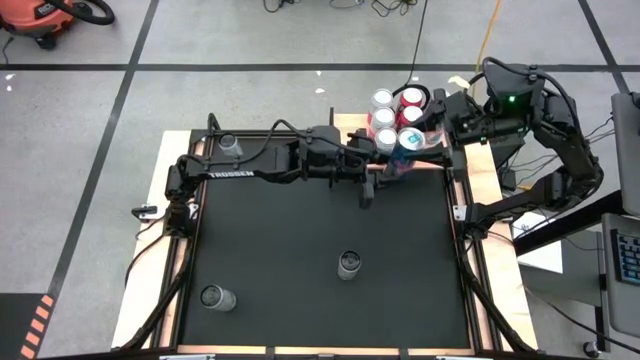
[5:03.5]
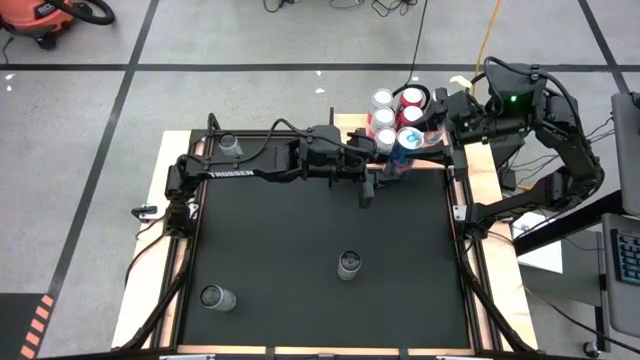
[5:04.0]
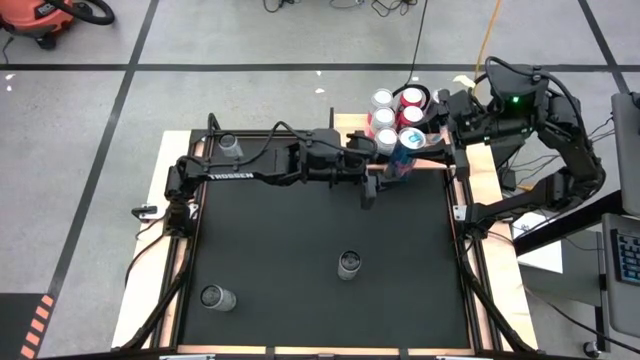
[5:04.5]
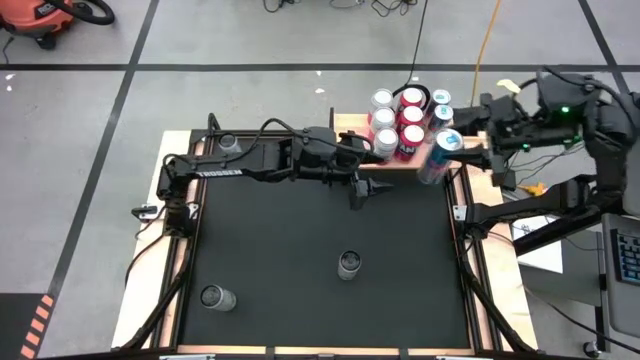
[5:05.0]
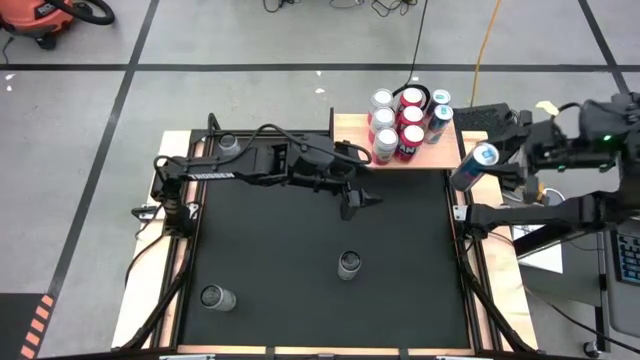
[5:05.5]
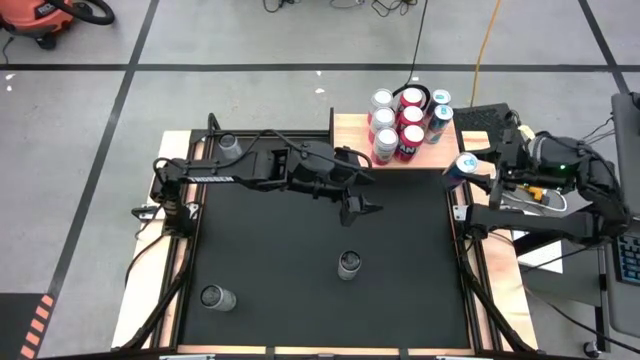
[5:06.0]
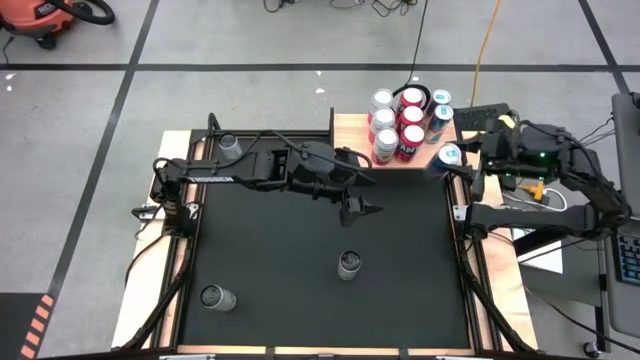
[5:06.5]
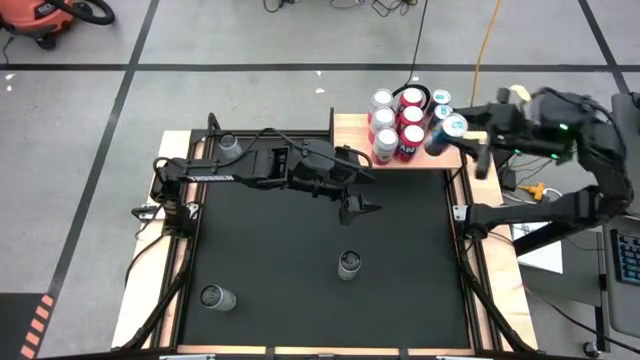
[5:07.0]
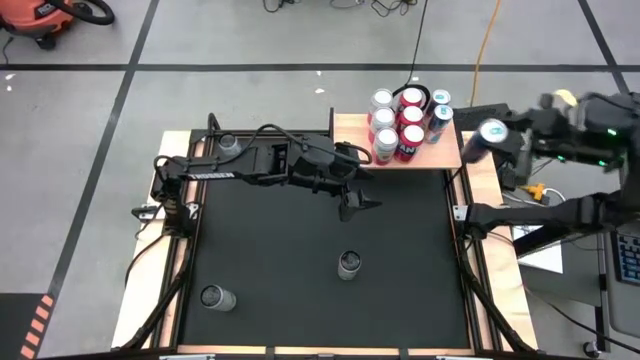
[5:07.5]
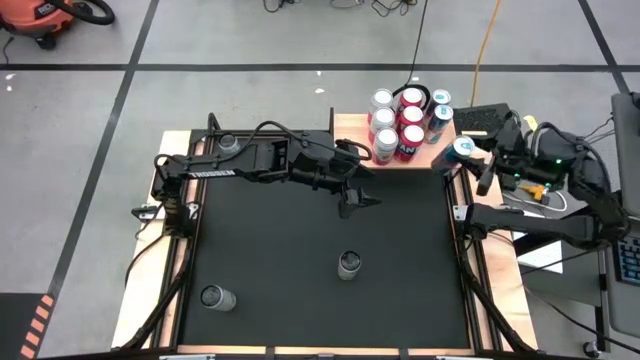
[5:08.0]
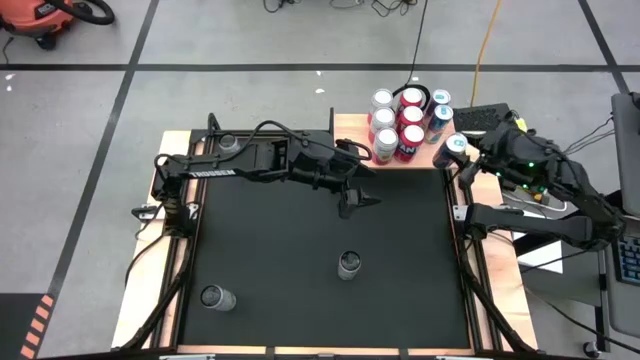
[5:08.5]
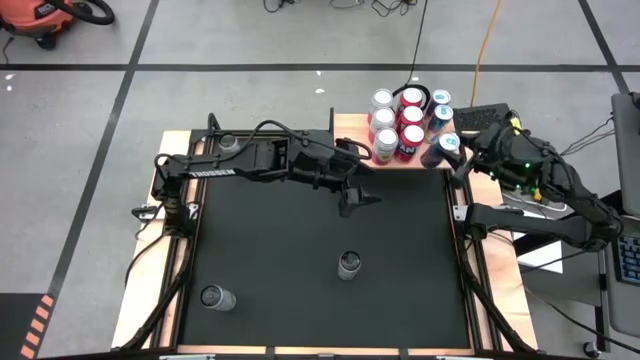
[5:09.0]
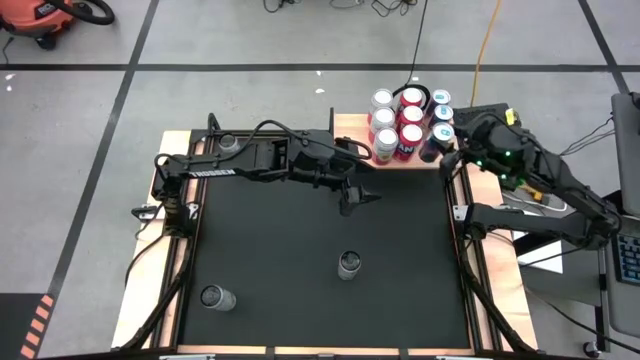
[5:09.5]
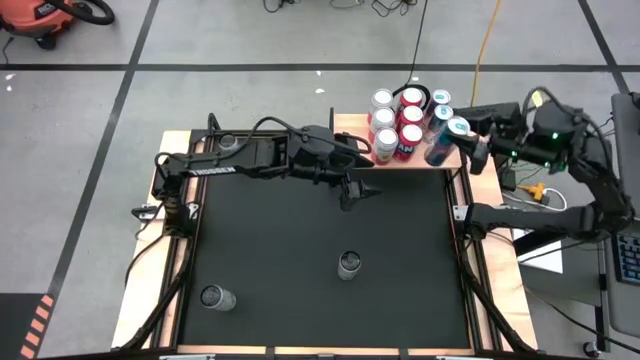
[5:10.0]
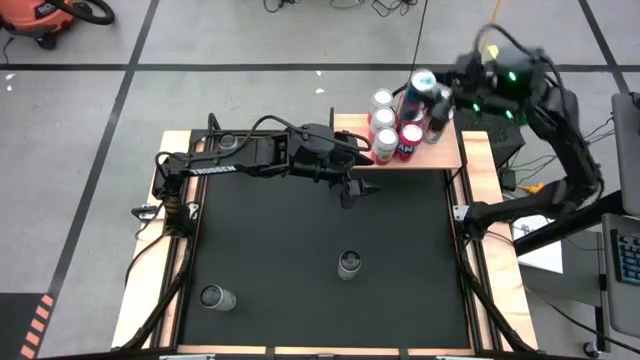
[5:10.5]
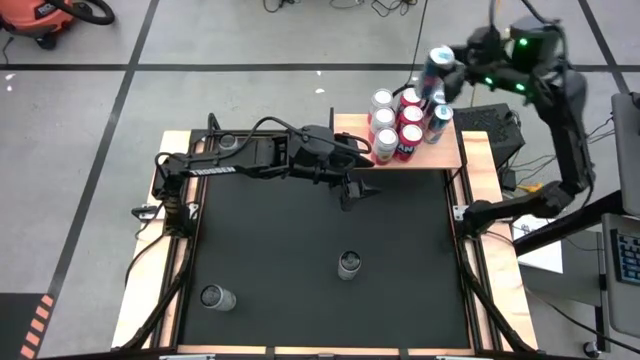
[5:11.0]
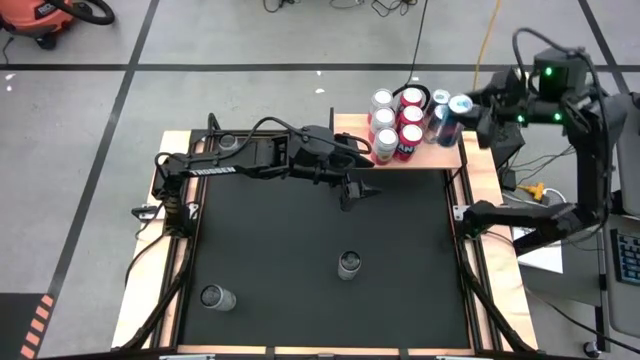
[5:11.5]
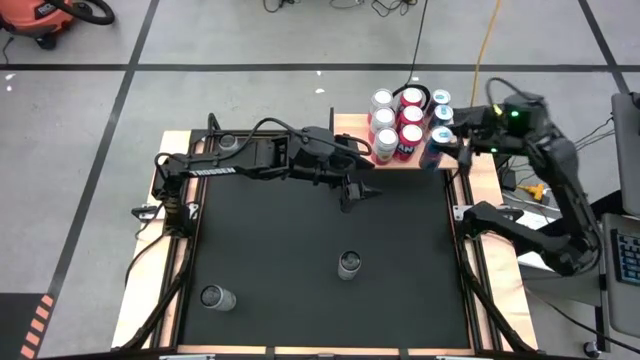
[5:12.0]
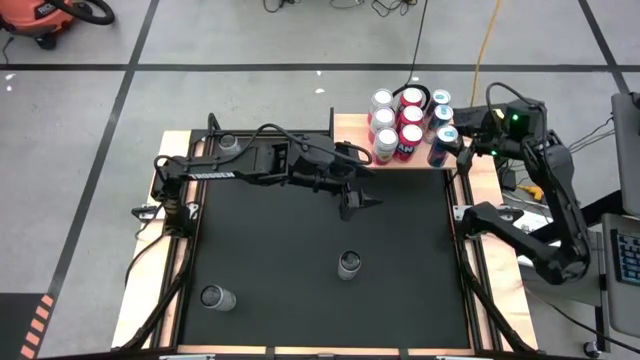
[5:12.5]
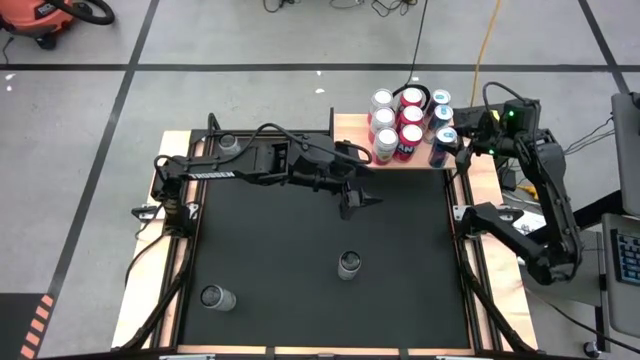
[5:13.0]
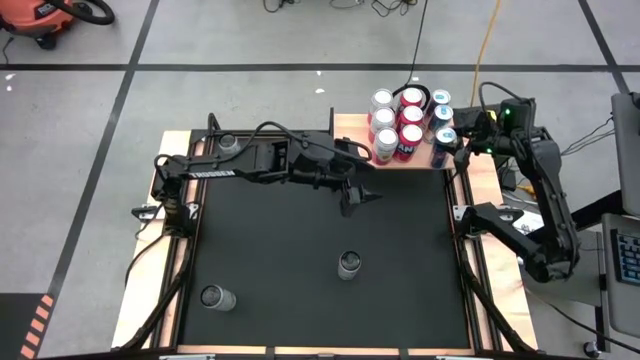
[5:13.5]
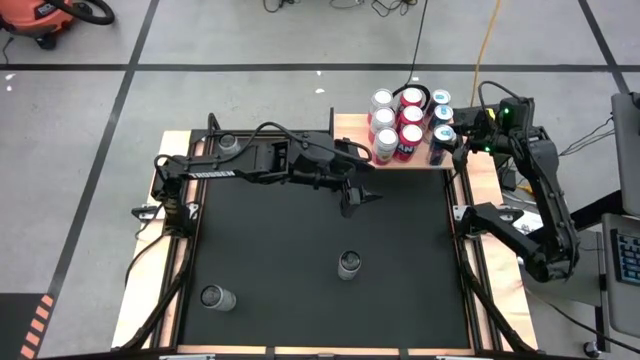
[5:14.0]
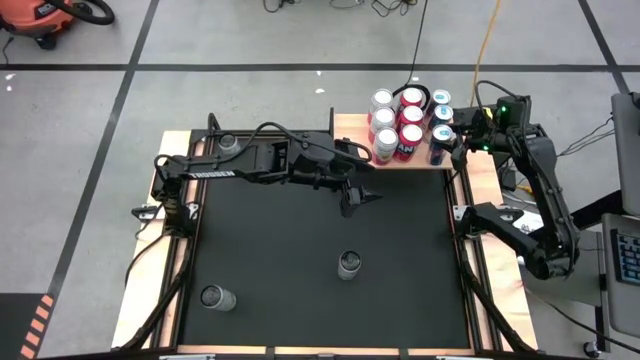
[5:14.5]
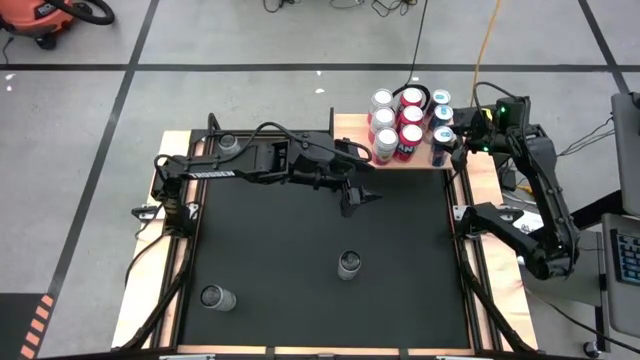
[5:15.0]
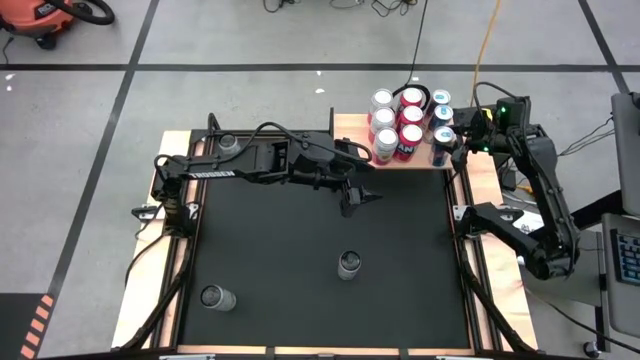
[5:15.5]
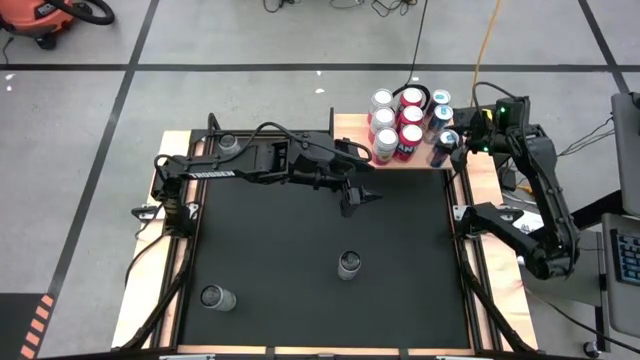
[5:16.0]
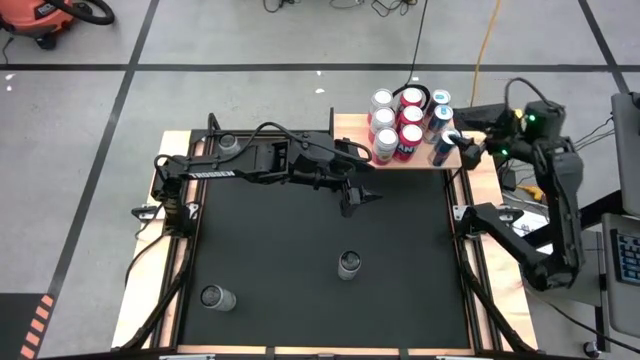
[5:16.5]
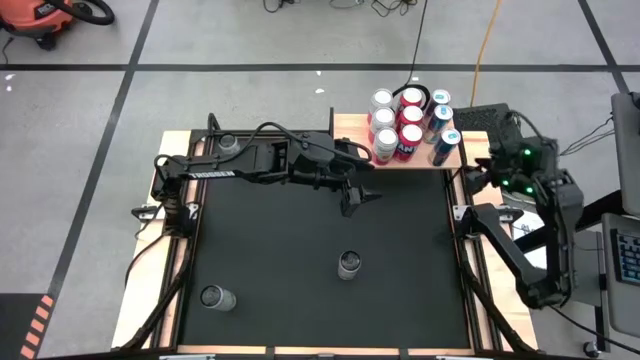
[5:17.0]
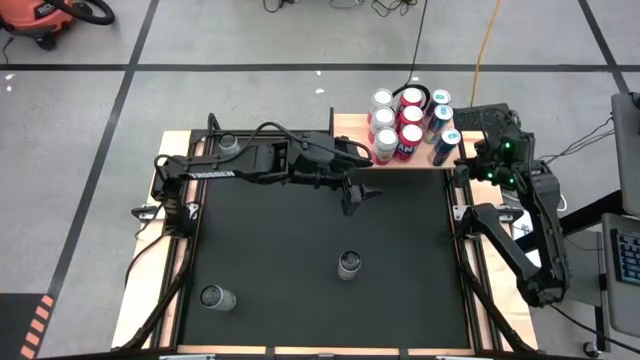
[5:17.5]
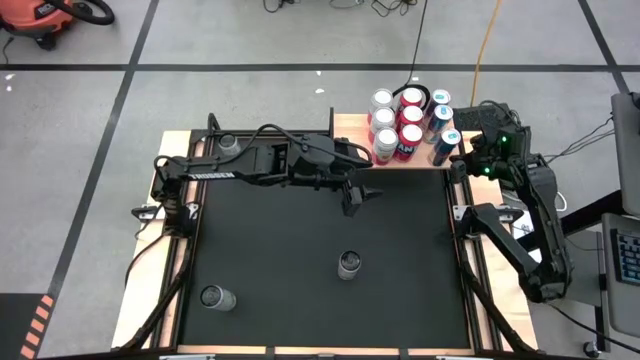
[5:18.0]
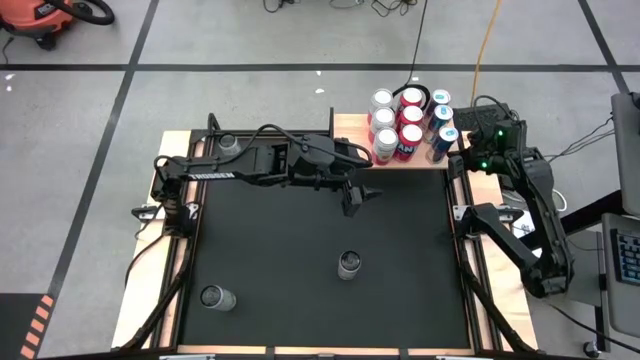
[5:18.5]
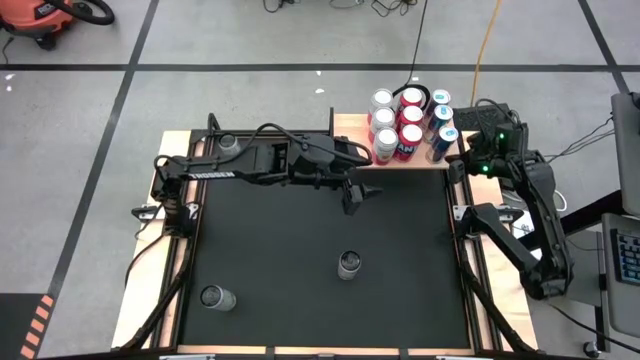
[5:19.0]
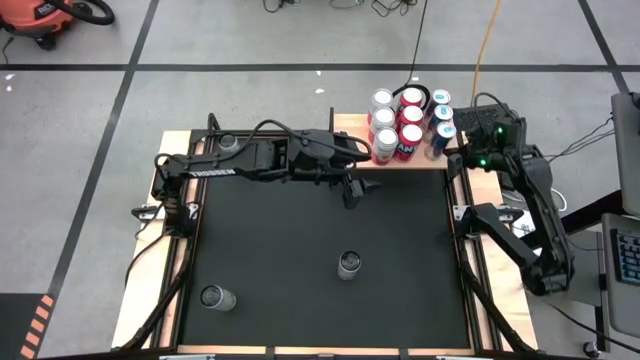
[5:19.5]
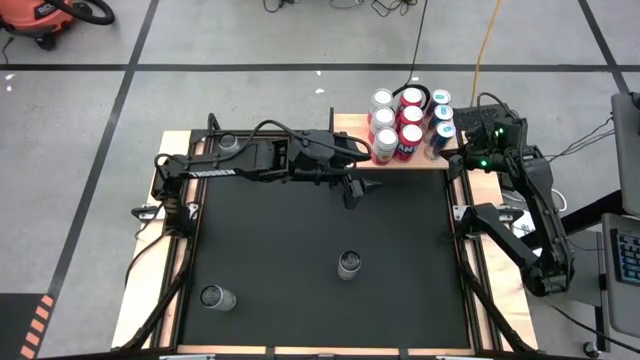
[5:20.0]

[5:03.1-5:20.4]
Task: Place canned beverage on shelf
Put the blue soda can on the shelf aligned with the other blue soda cans

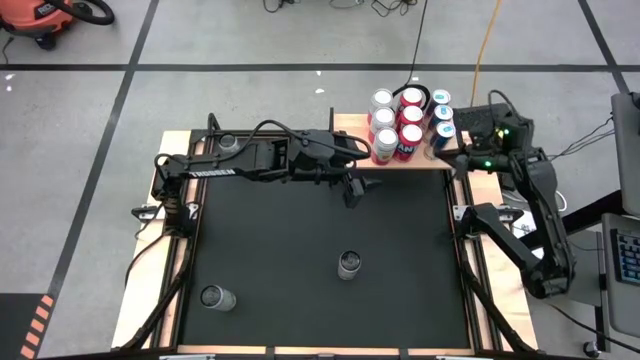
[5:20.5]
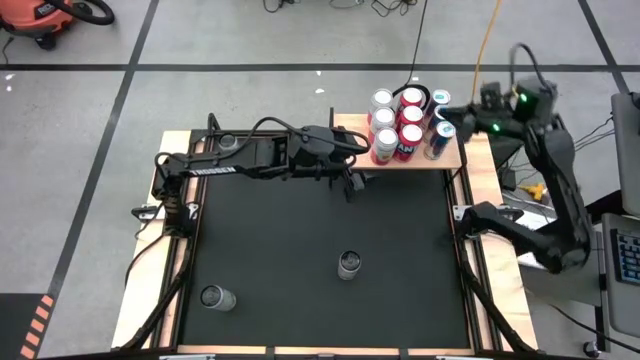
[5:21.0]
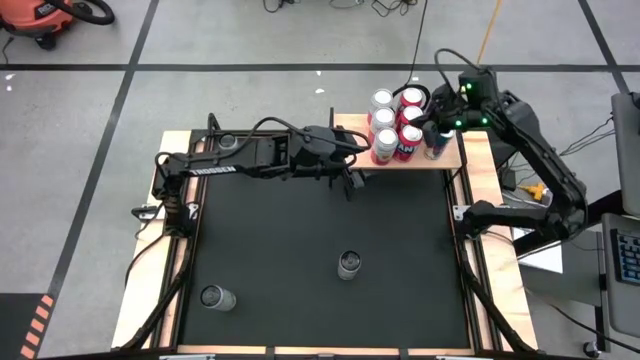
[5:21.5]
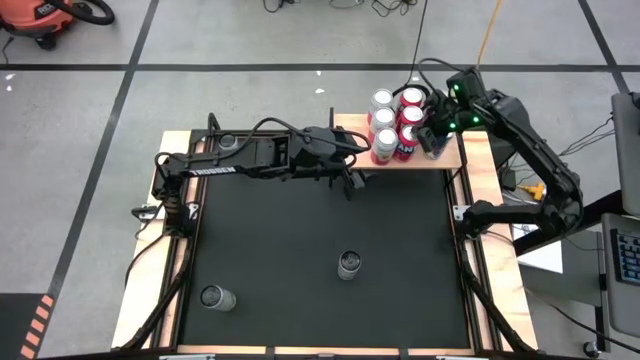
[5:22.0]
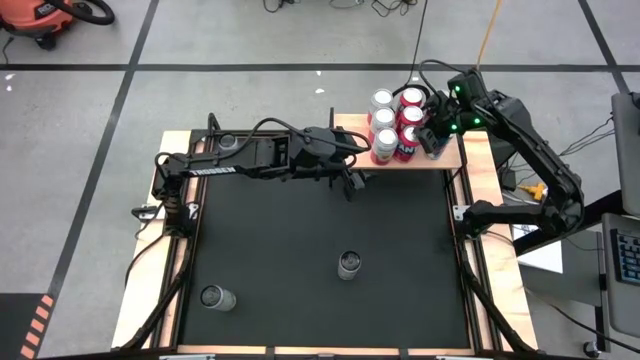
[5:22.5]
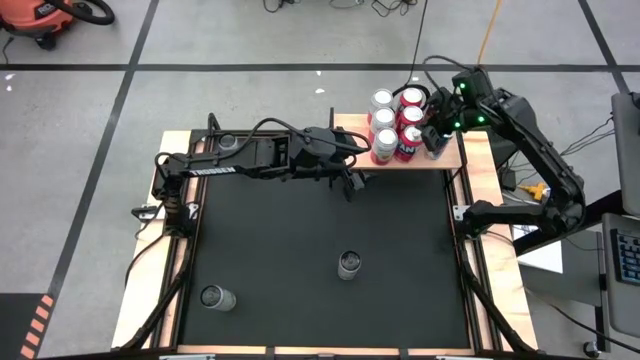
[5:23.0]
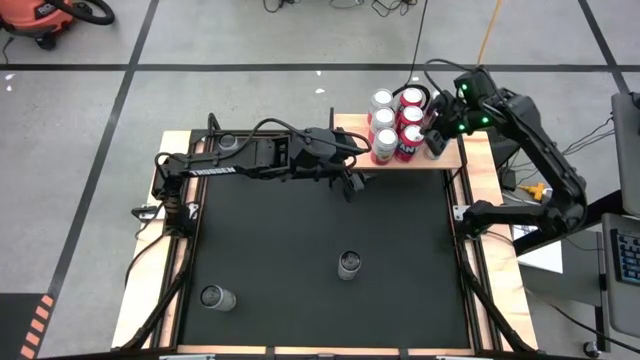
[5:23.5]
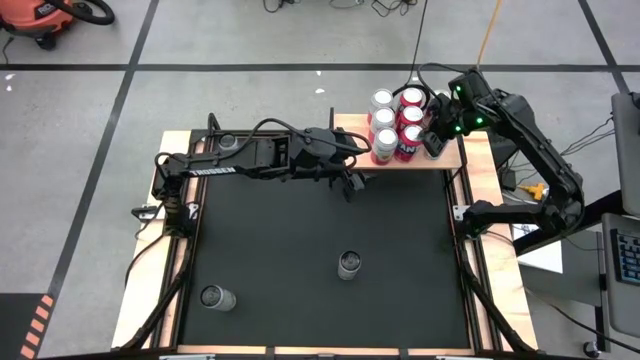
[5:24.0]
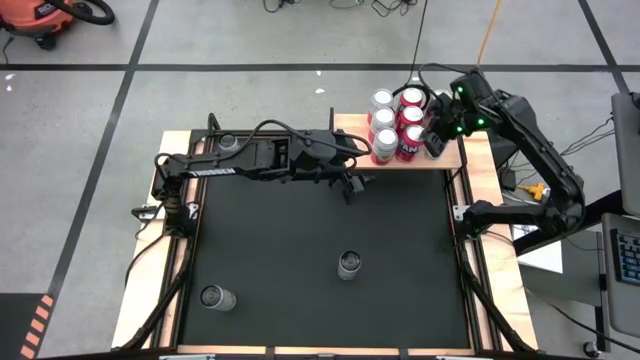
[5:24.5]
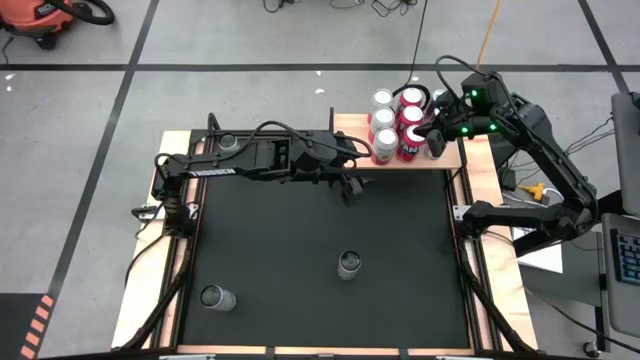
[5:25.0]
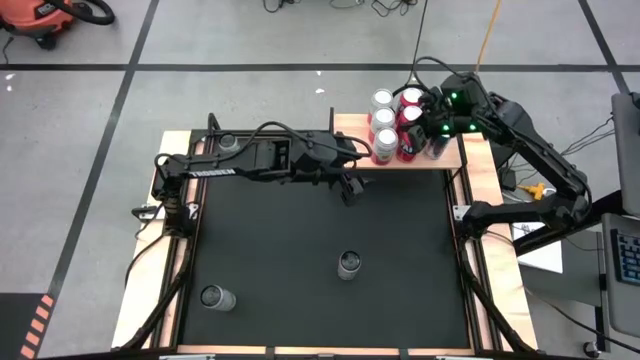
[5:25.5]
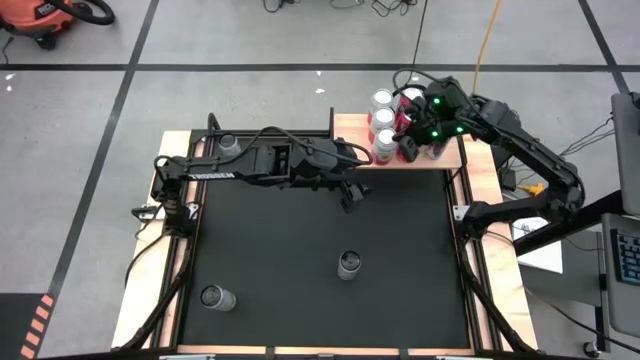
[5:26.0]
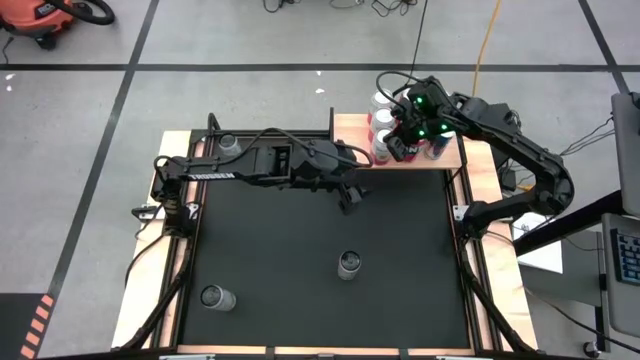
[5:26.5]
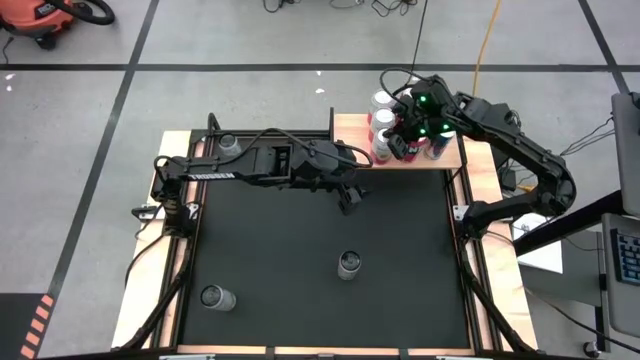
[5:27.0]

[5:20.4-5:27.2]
Adjust the soda cans on the shelf
